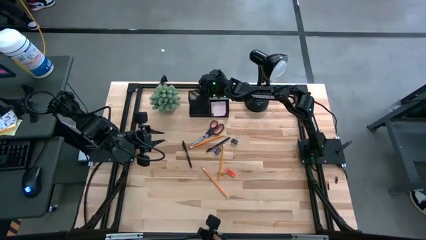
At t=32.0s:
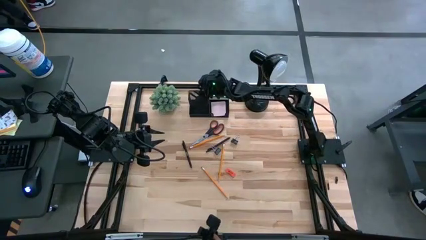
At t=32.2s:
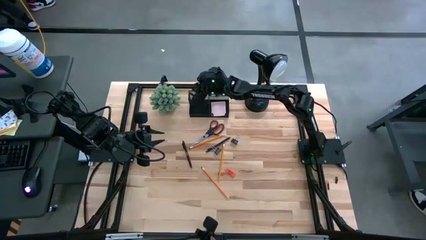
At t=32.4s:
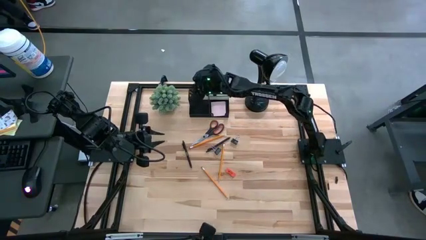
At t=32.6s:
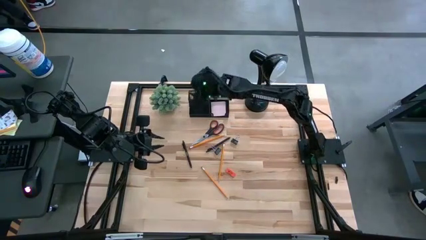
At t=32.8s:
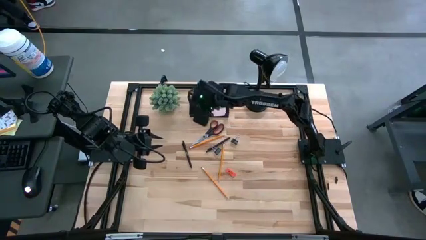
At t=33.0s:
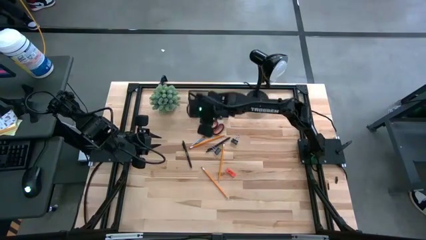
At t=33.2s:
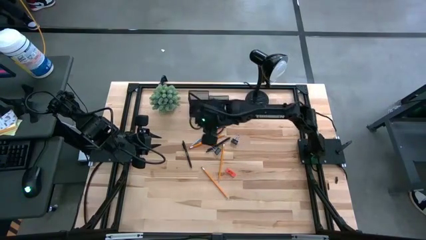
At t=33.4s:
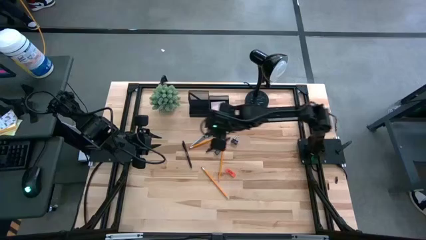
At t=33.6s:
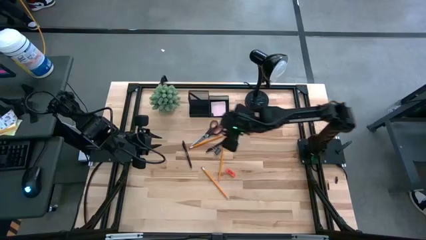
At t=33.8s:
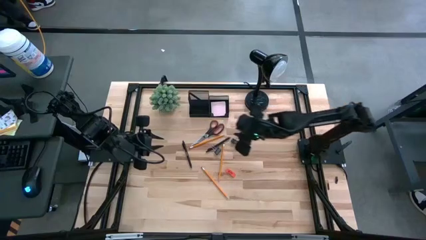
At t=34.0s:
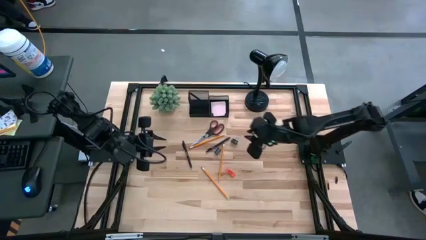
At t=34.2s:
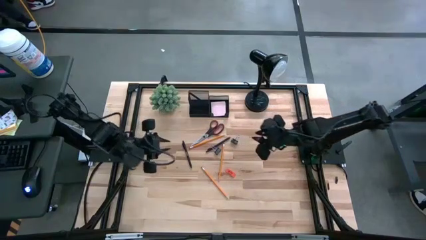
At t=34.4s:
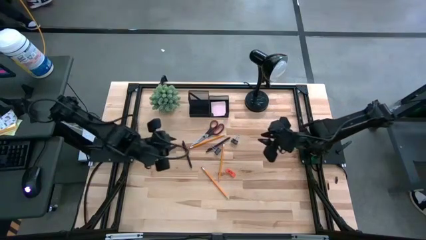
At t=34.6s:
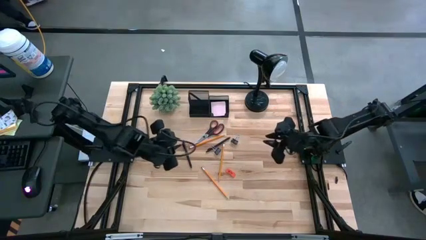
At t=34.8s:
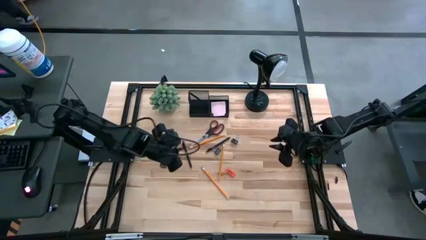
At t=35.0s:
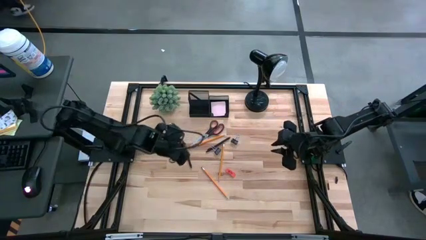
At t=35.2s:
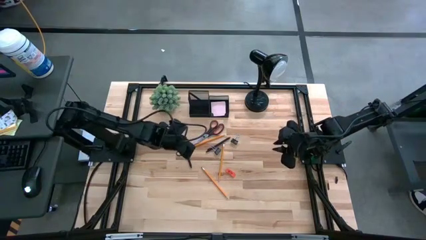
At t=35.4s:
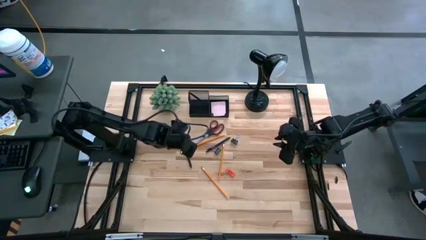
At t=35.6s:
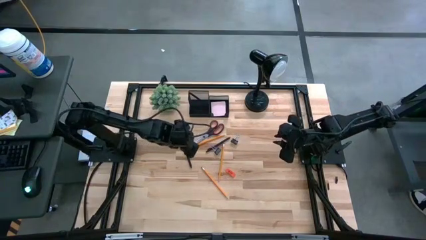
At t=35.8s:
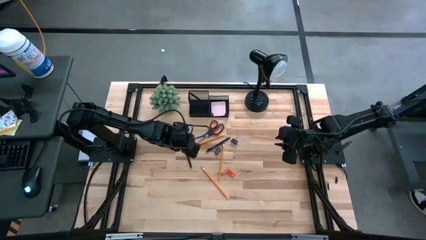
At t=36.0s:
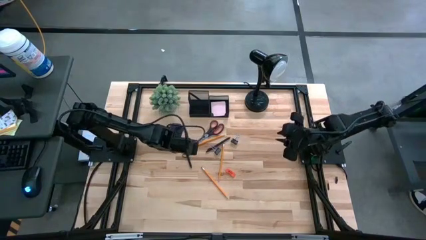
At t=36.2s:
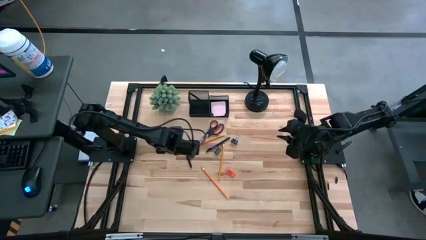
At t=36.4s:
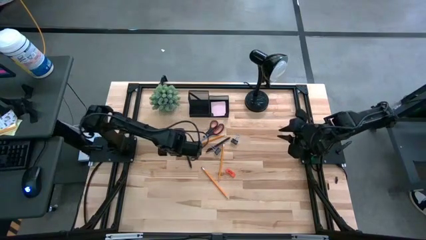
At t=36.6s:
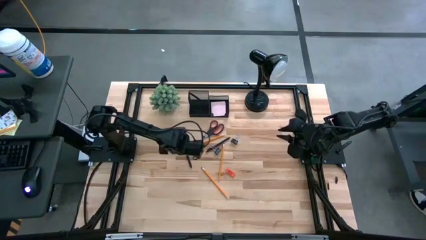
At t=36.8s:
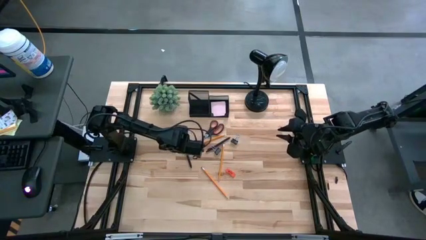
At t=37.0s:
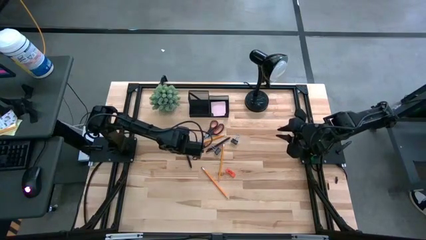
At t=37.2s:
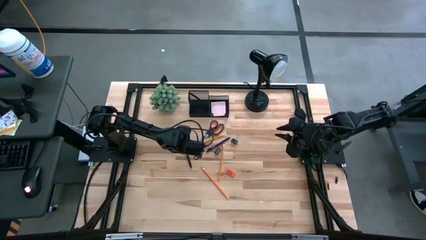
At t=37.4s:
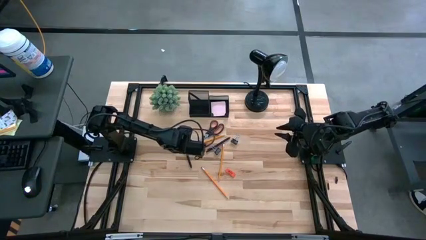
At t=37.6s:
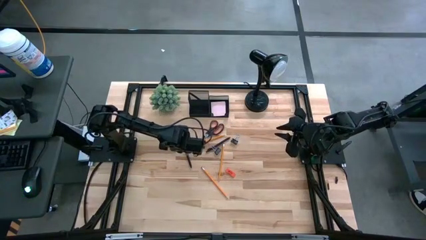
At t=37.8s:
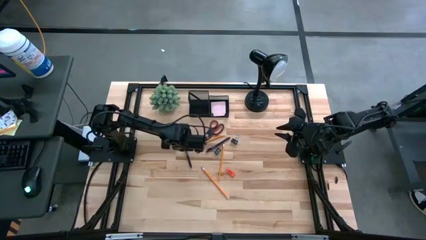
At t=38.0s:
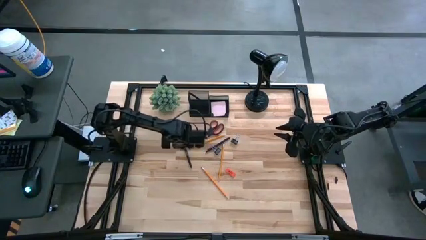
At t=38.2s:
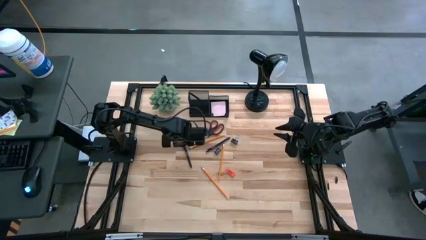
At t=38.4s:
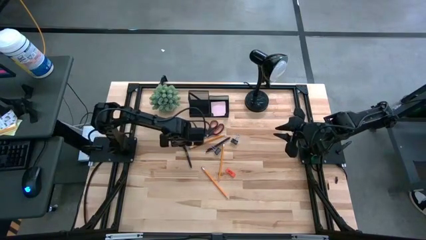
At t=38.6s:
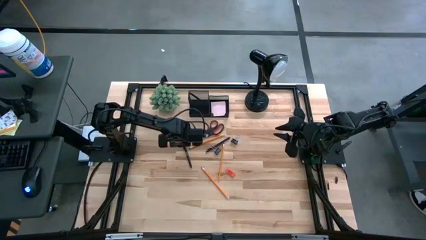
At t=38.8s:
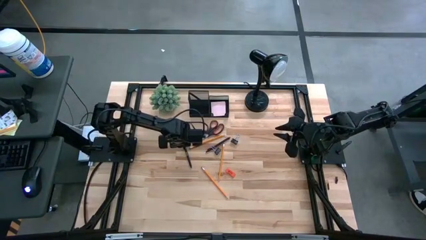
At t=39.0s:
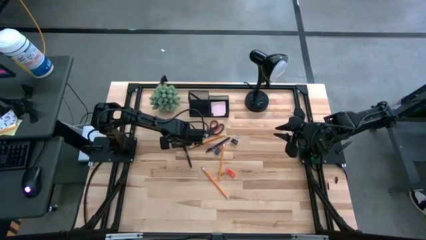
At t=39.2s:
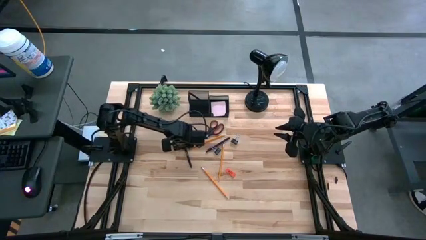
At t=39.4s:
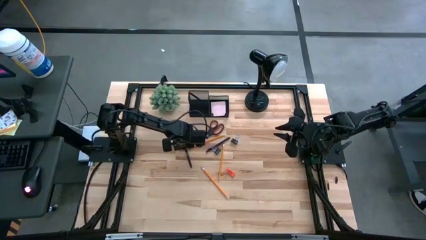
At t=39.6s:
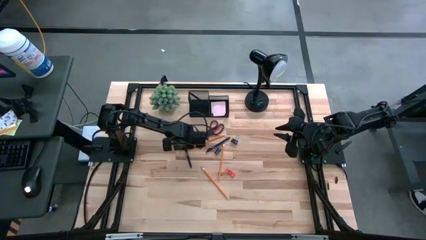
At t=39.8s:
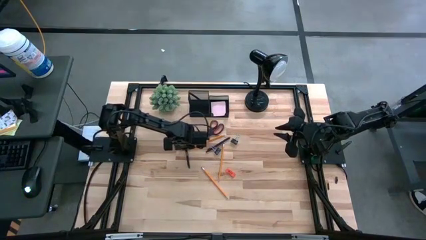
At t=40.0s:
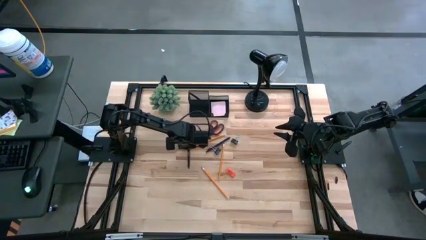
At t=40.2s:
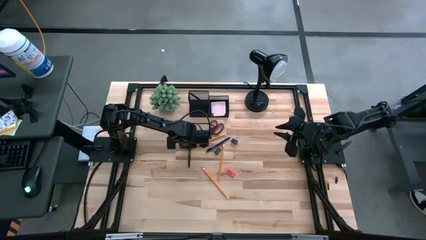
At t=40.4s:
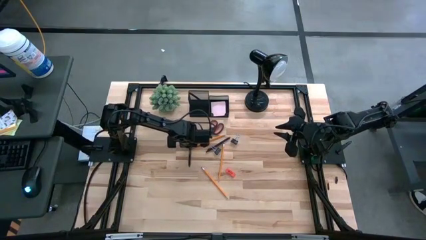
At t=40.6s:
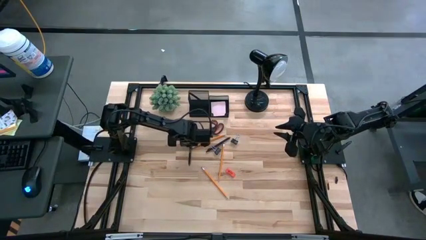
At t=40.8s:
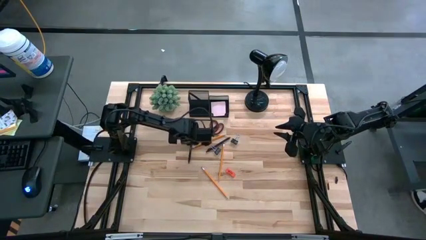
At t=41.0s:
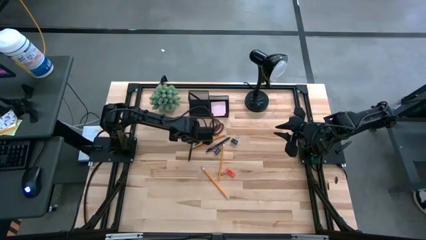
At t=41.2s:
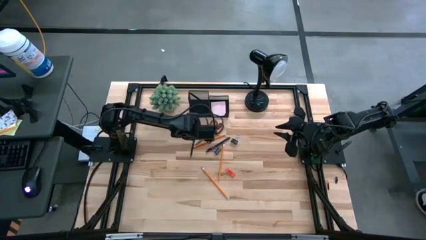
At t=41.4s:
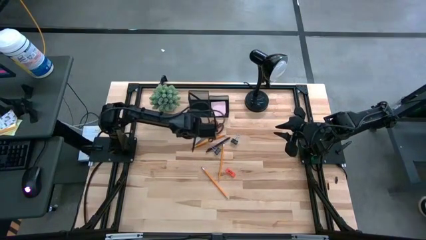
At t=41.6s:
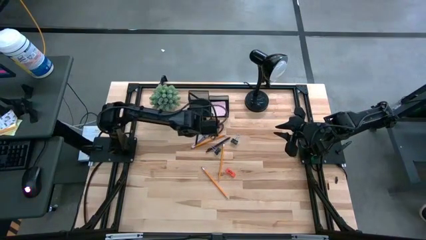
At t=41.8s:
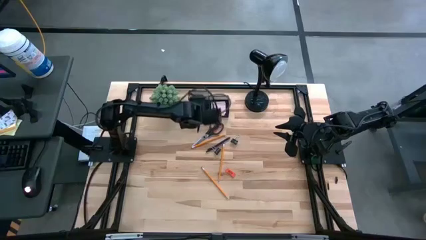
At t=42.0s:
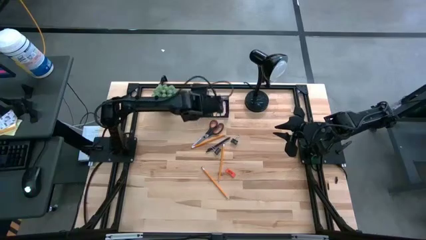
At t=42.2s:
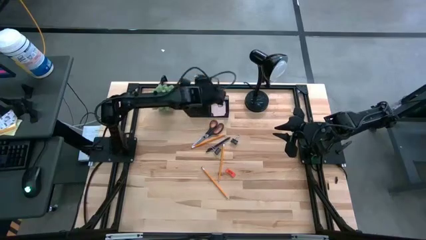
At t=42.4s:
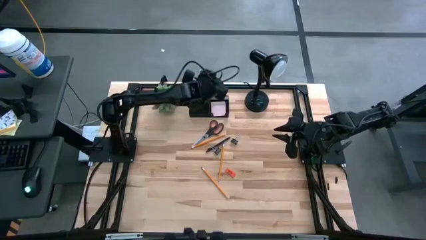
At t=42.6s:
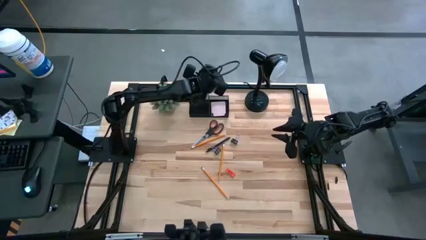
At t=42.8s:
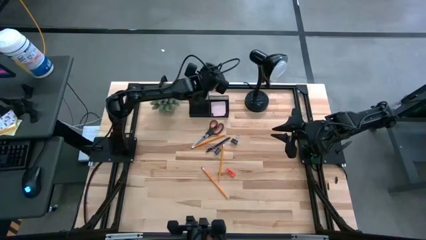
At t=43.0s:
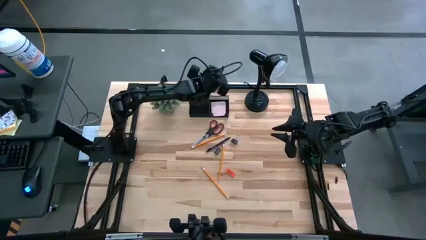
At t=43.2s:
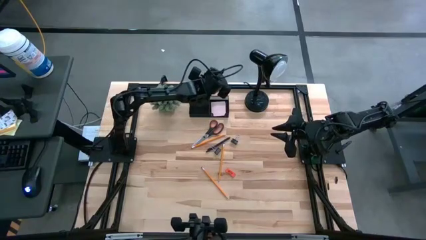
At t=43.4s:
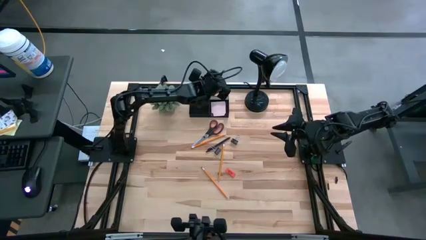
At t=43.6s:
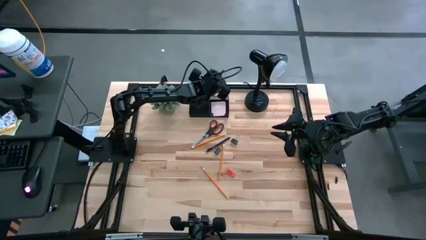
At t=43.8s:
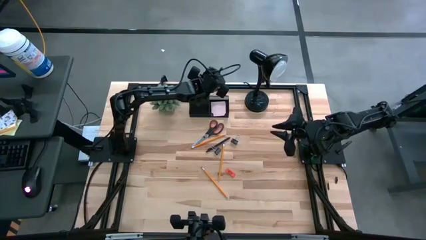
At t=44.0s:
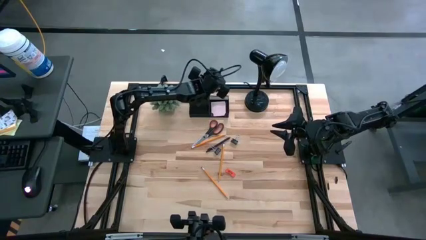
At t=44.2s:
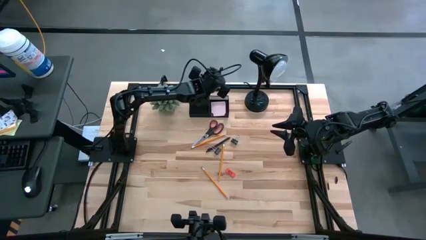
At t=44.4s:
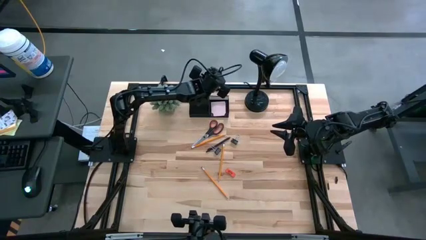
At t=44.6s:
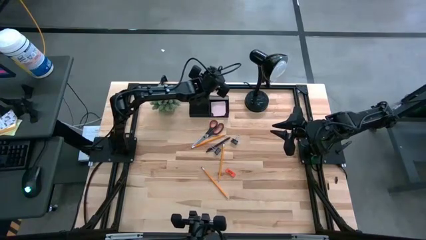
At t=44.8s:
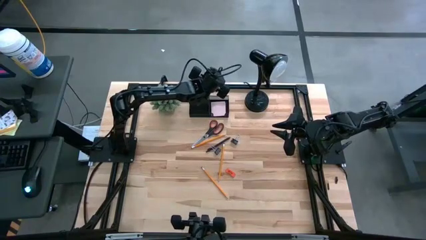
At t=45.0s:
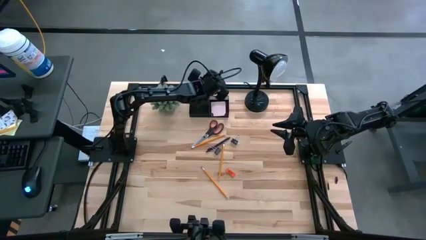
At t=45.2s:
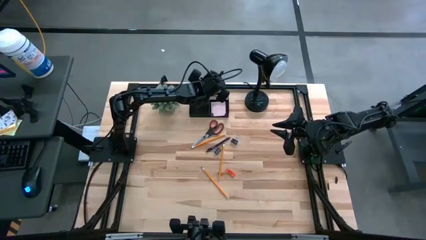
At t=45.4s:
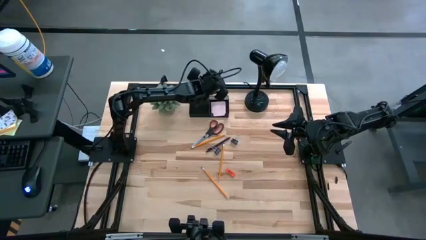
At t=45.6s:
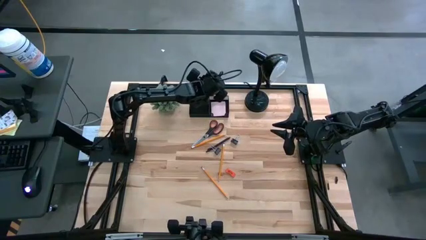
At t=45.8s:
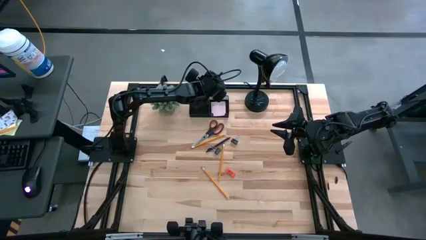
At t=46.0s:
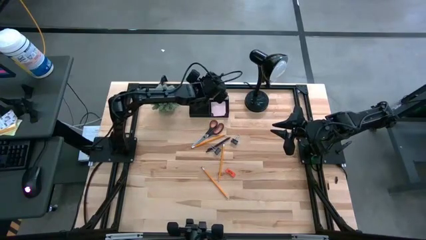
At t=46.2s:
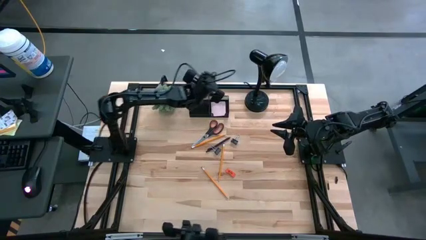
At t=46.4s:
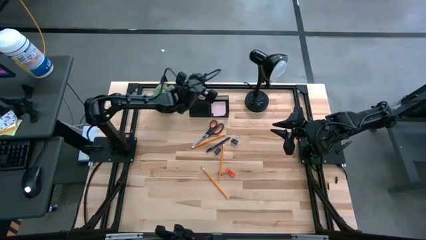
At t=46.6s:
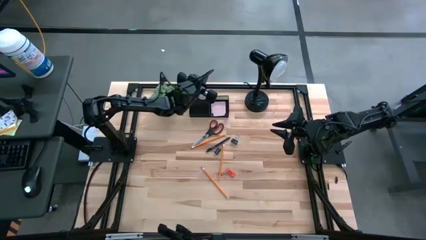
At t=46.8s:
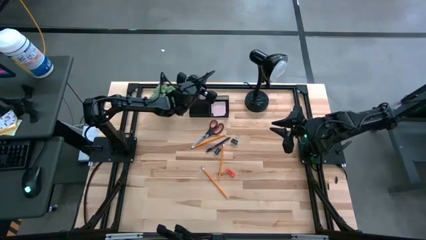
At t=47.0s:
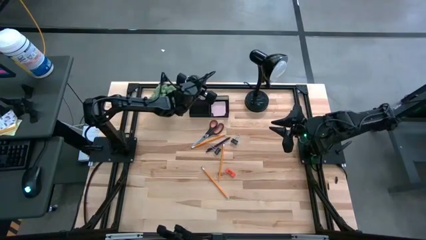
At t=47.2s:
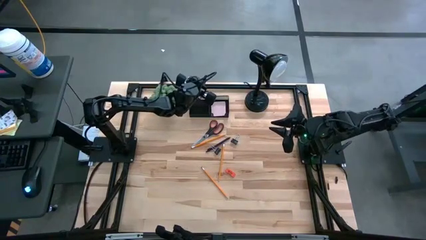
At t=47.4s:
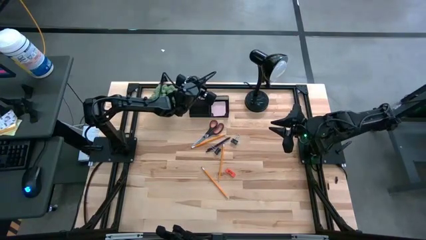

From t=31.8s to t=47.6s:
Task: Pick and place office supplies into organizer
Put the left black pen into the black desk organizer
